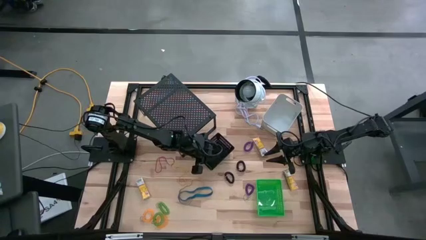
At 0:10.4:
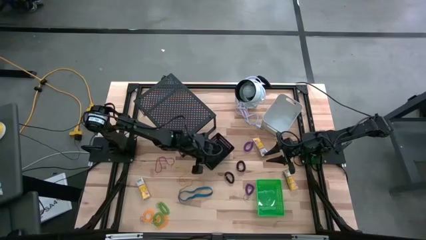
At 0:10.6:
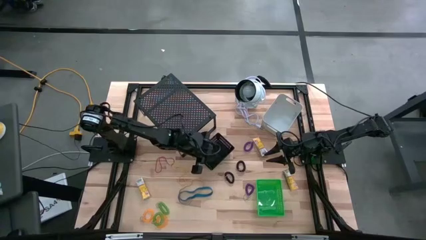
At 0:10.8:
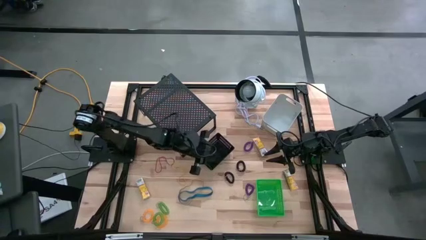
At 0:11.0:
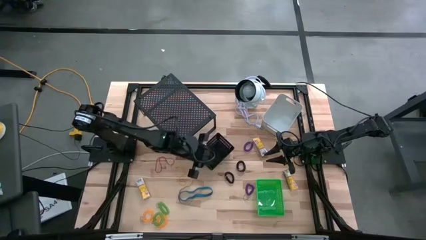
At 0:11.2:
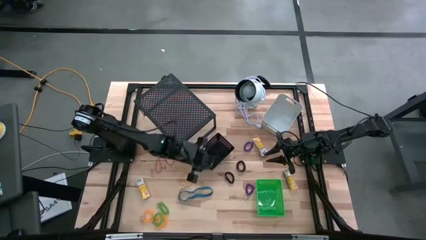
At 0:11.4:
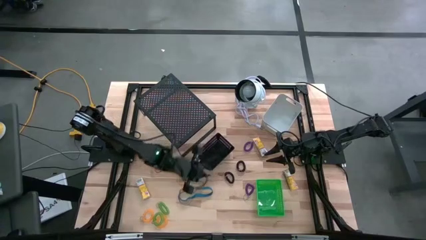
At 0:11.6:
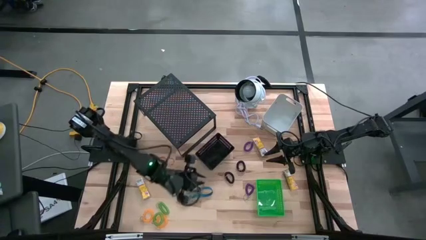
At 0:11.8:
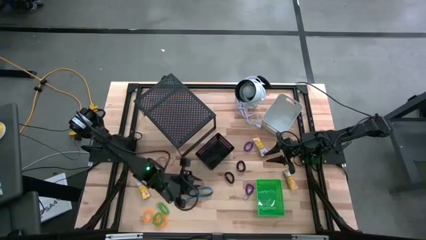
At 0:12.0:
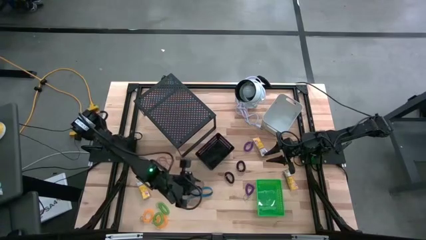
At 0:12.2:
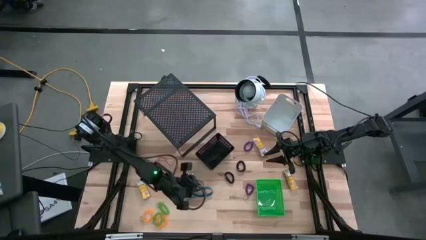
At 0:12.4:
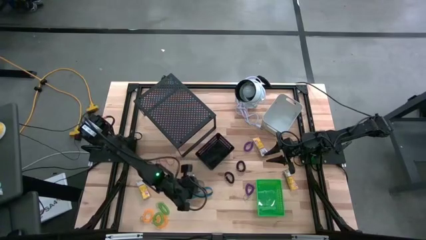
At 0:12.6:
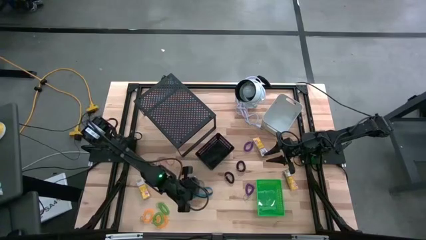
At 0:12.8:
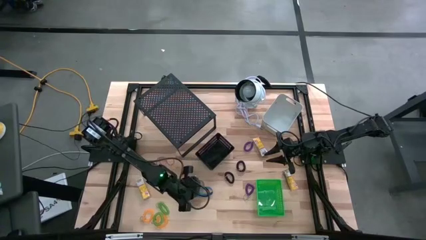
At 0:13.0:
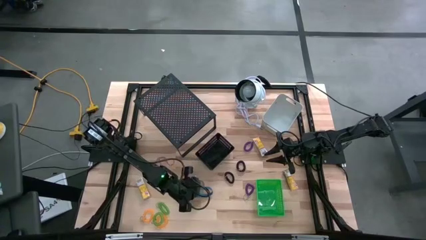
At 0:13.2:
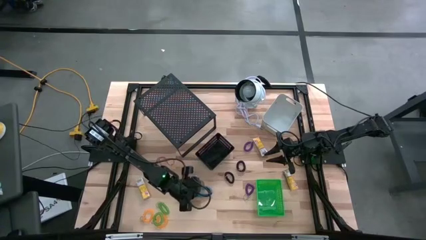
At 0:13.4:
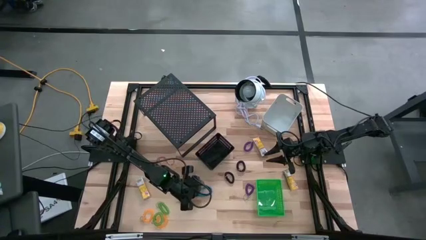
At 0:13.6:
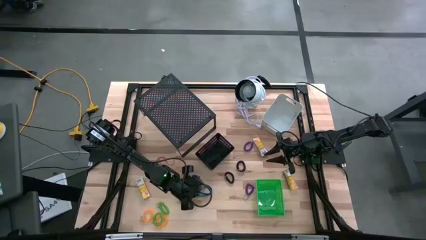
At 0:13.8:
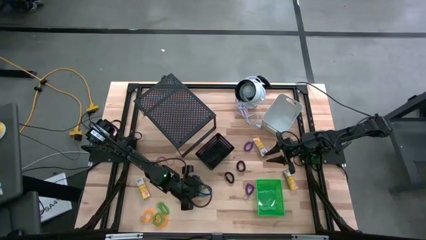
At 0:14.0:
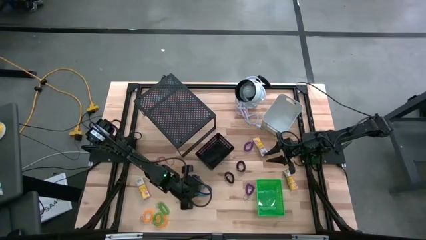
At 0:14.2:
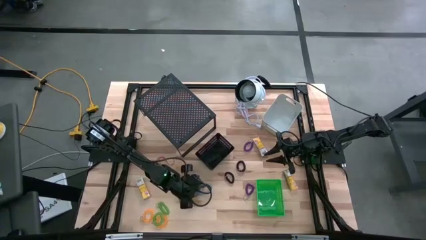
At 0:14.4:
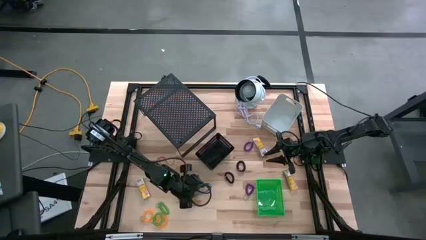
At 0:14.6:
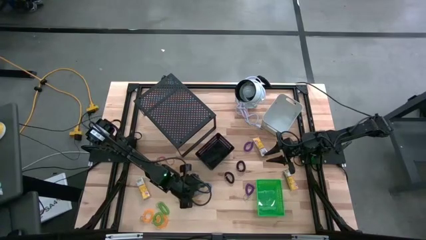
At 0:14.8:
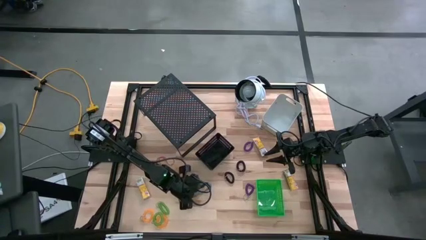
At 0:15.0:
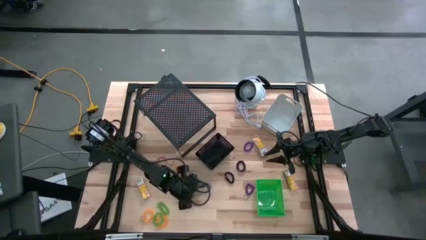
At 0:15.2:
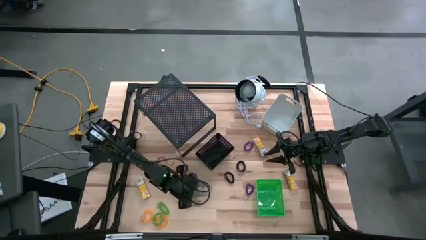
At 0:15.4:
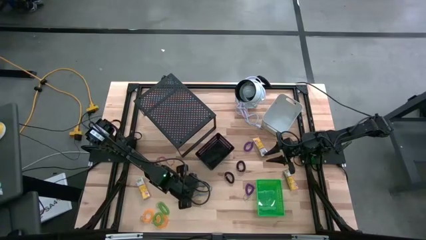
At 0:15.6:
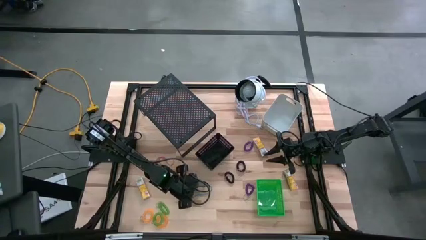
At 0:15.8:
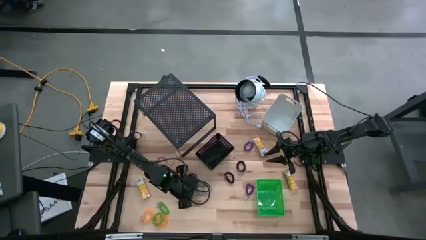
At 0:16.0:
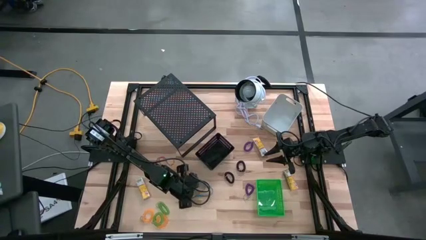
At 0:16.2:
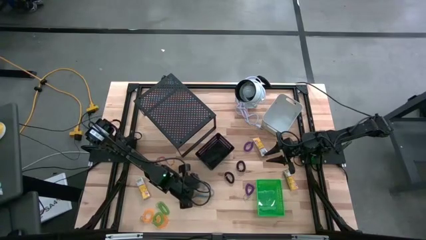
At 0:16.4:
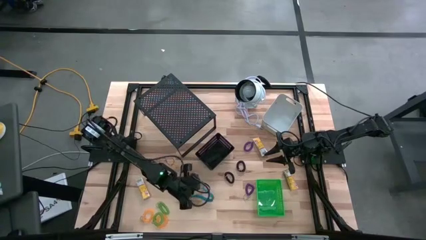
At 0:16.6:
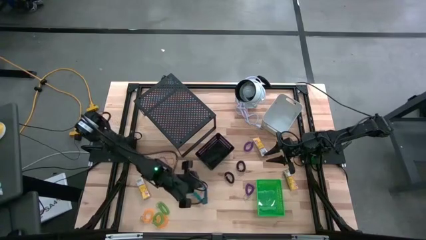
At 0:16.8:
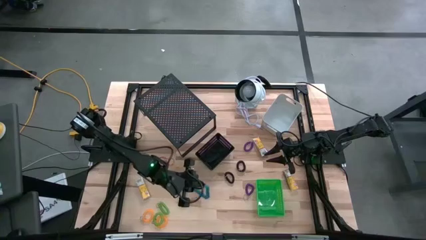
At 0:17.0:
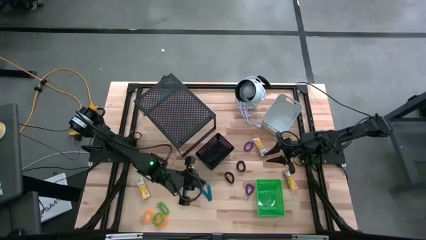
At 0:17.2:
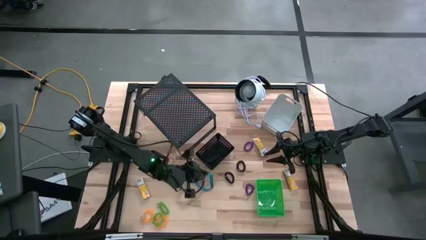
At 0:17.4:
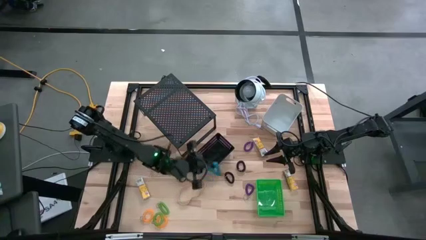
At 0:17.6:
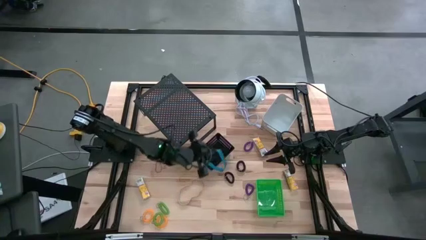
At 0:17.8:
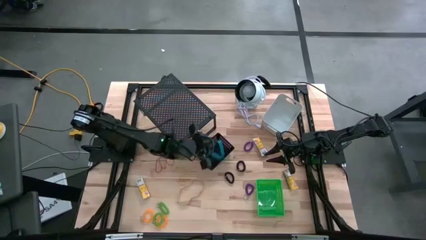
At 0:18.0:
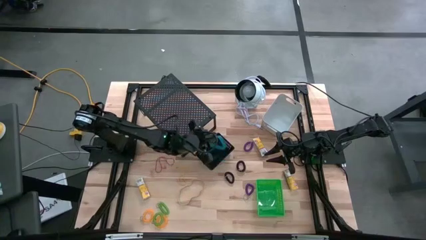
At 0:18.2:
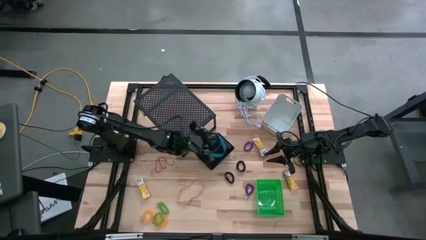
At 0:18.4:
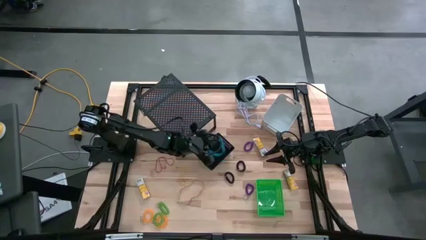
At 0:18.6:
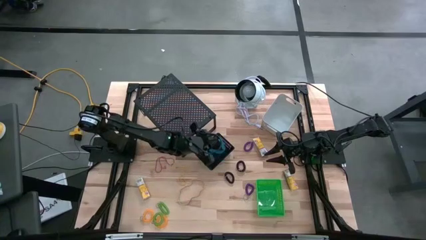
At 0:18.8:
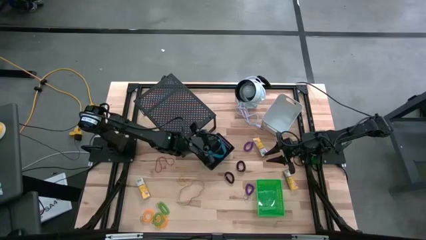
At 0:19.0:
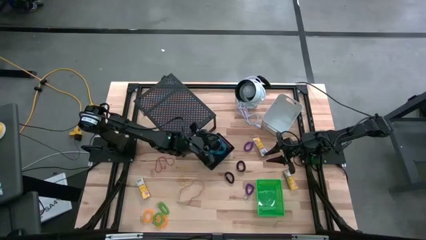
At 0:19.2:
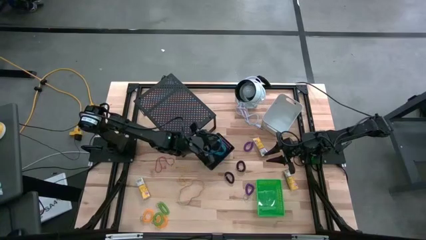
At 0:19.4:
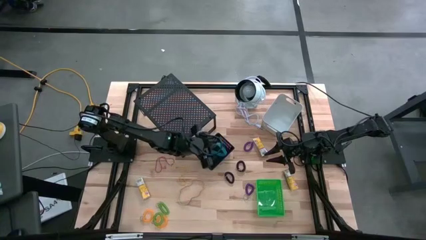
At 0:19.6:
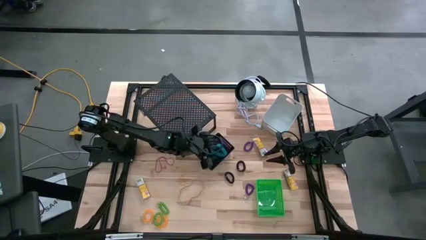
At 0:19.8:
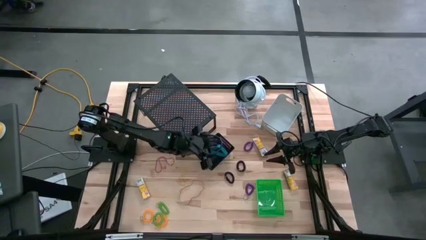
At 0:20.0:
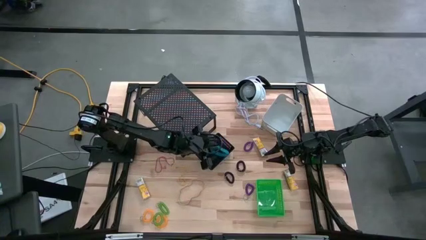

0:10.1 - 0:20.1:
Task: Pick & Place Office Desk Supplies
Put the blue rubber band into the black bin

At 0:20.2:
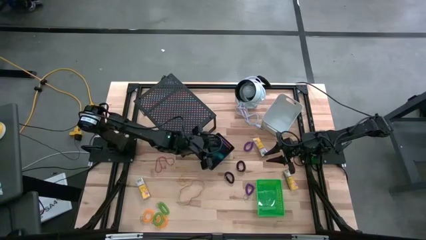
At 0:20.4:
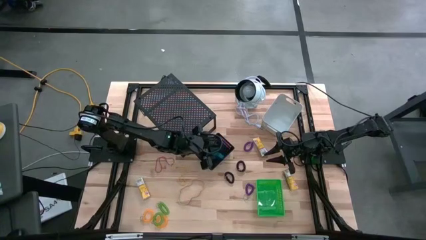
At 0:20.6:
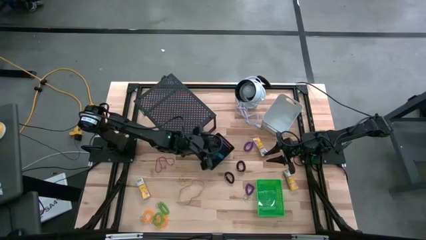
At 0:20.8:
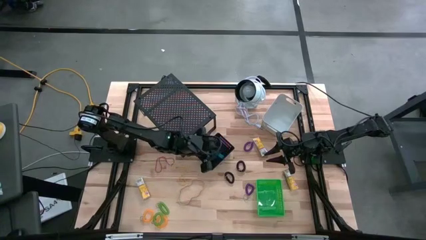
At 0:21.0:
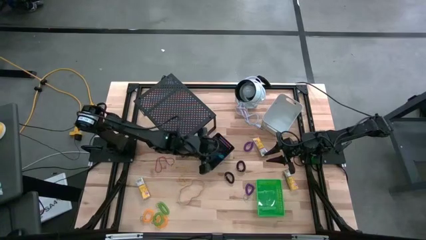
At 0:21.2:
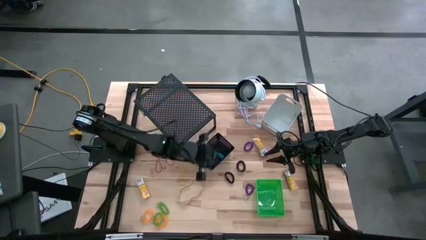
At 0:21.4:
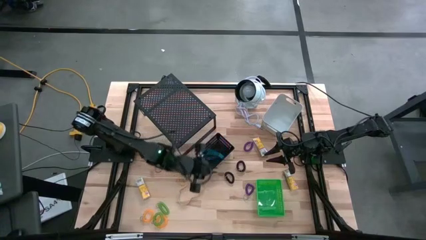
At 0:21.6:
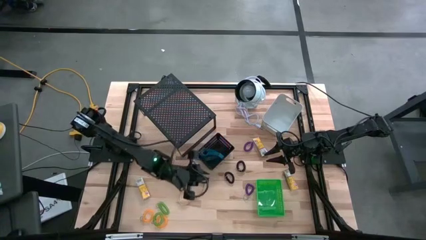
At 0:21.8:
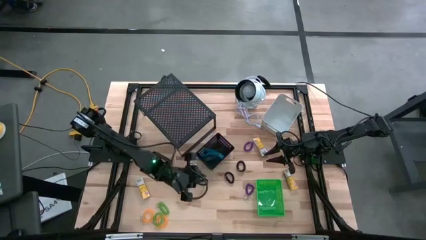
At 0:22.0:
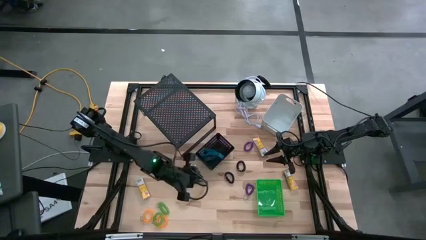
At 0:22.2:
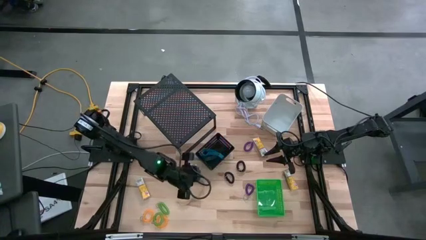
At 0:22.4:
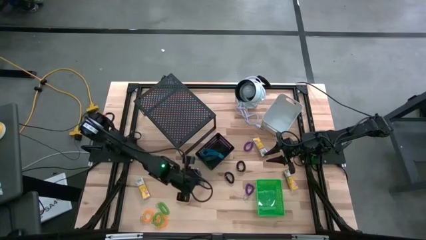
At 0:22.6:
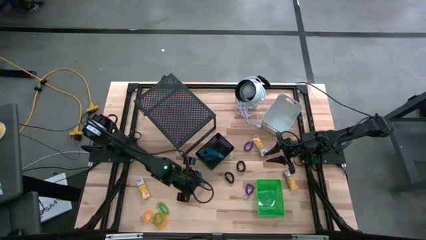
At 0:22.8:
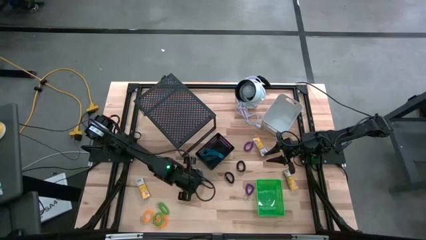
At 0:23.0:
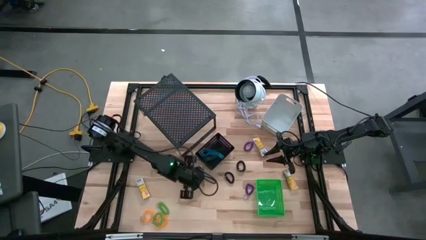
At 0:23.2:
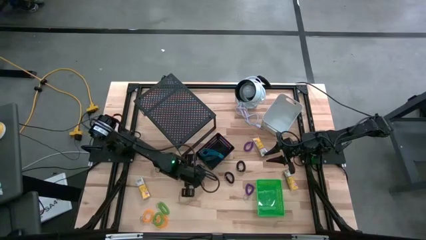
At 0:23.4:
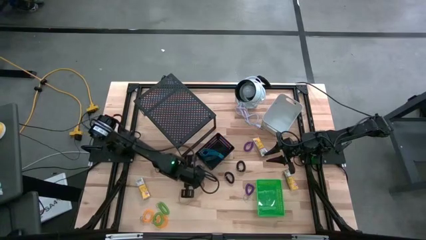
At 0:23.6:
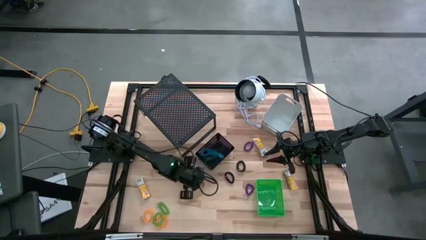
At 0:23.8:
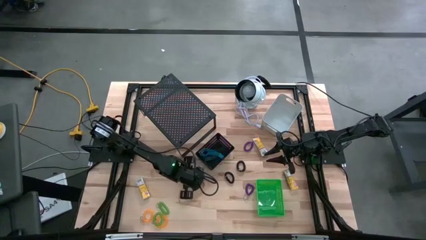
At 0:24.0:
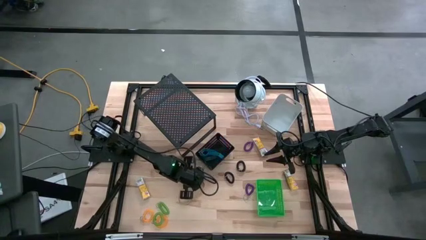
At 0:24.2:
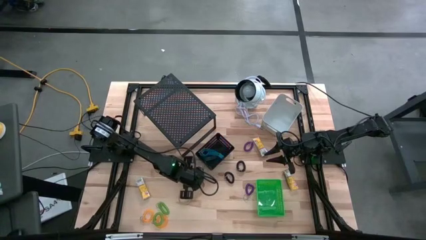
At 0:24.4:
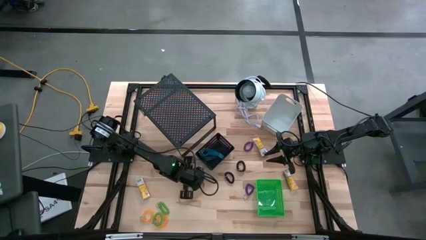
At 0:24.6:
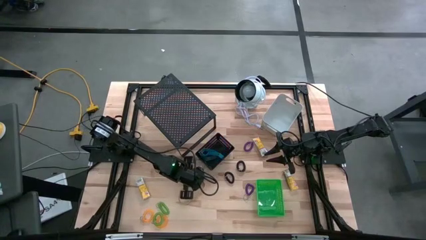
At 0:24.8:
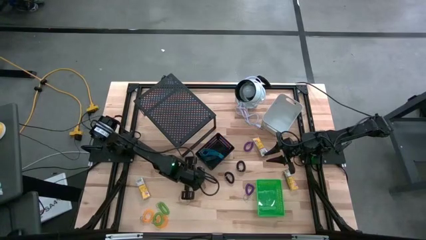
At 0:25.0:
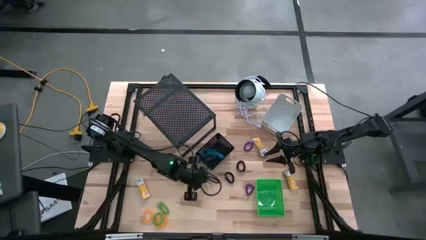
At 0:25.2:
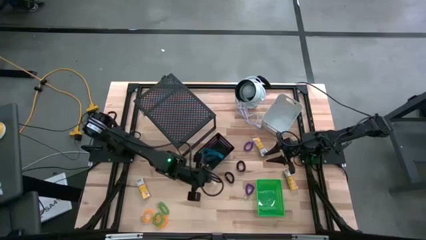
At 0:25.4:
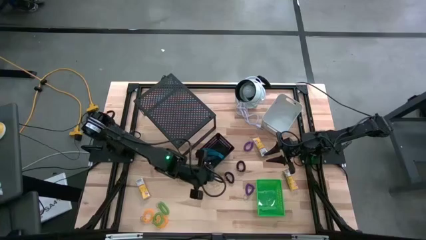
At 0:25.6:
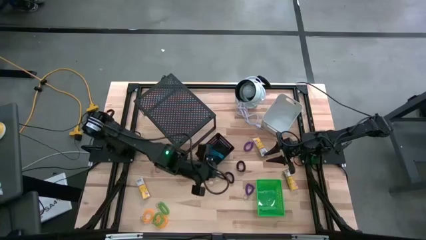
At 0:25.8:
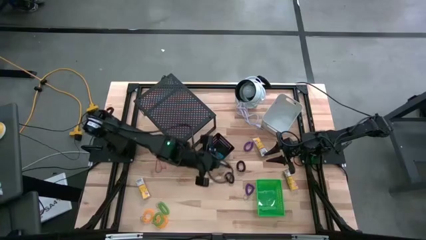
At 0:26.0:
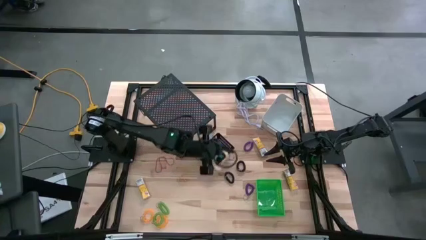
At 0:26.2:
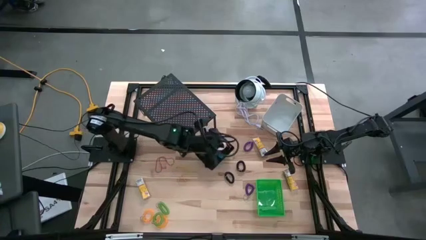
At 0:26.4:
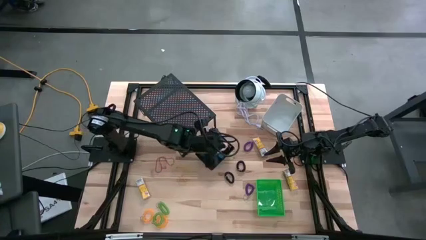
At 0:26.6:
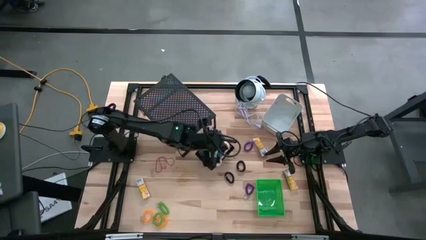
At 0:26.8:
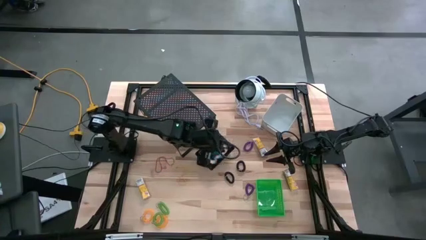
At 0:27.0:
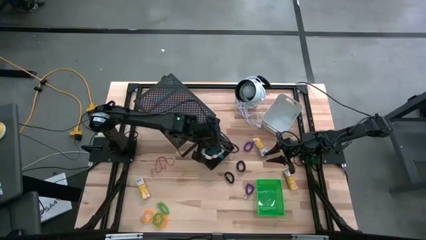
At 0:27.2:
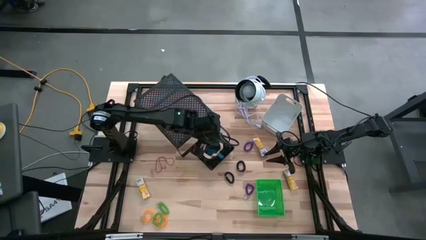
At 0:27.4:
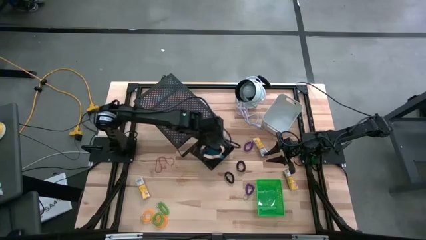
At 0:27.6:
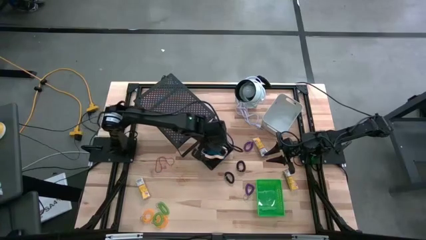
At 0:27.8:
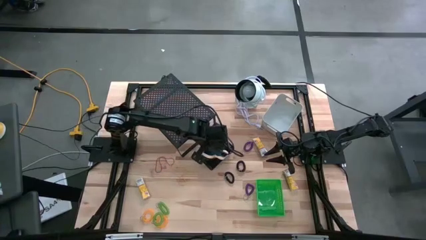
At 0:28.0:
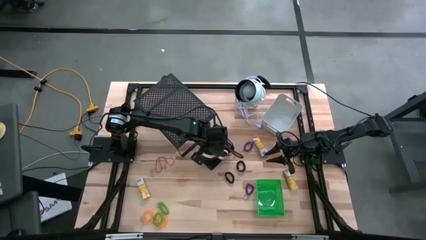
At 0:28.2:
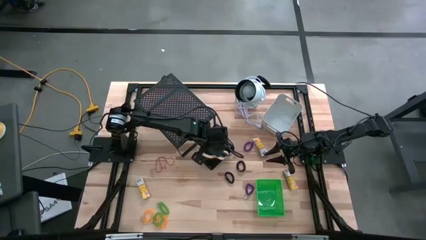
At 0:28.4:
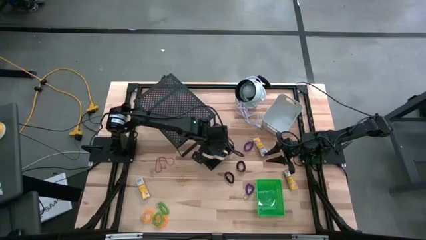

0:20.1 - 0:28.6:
Put the brown rubber band into the black bin
